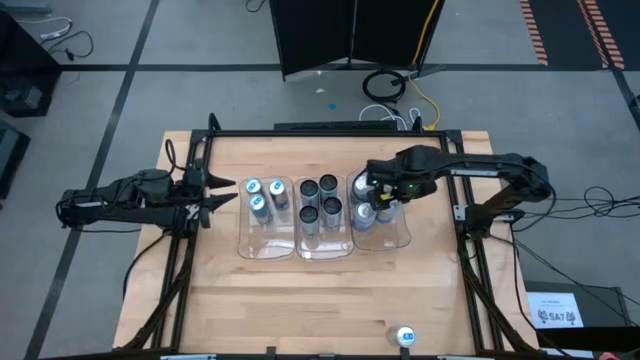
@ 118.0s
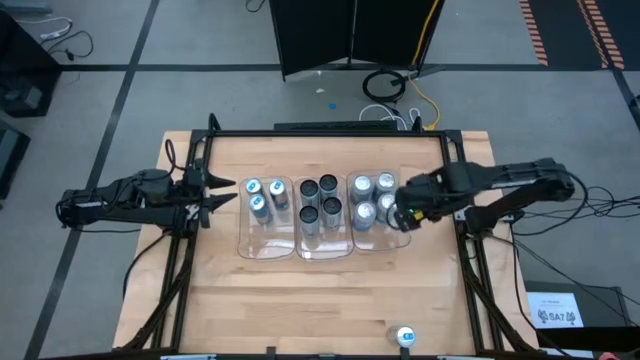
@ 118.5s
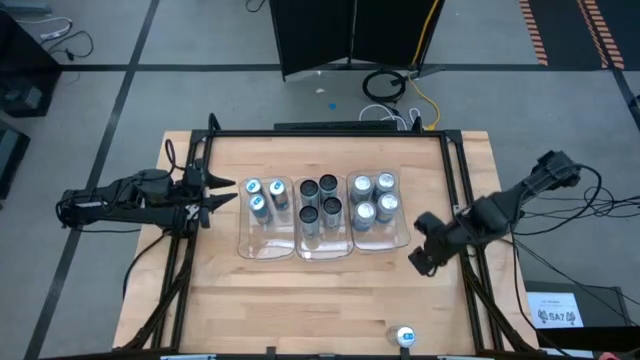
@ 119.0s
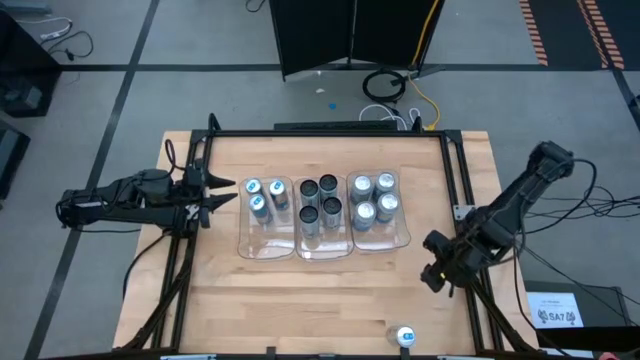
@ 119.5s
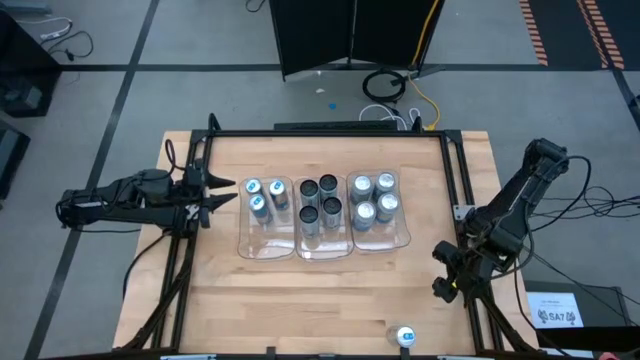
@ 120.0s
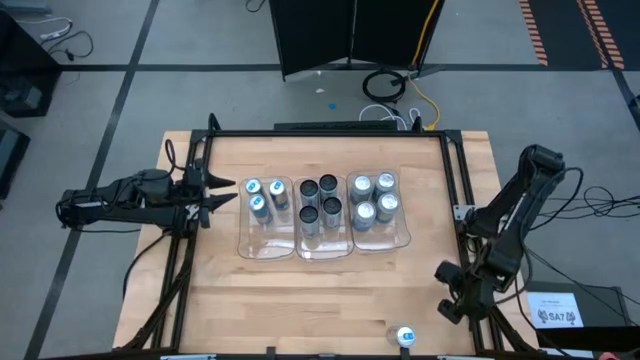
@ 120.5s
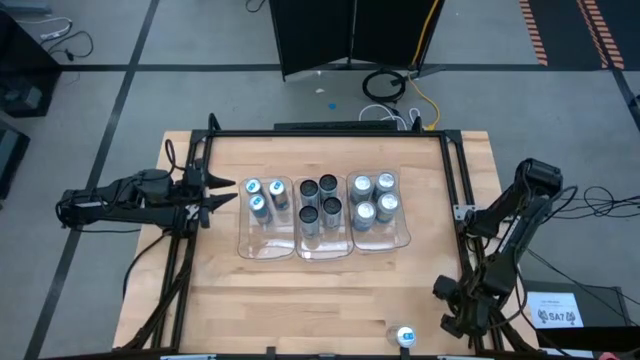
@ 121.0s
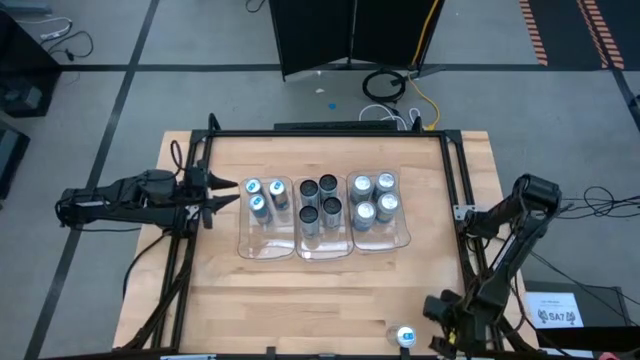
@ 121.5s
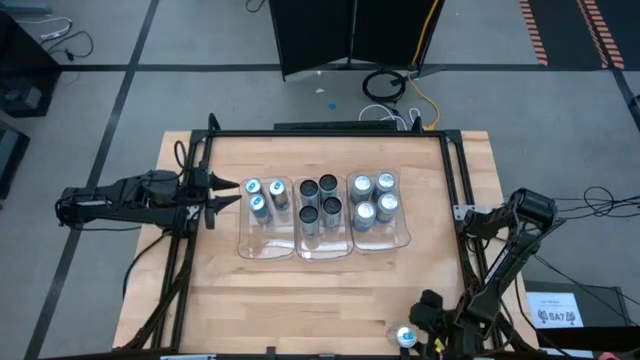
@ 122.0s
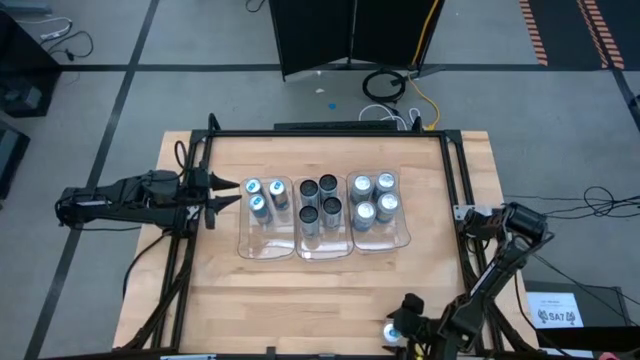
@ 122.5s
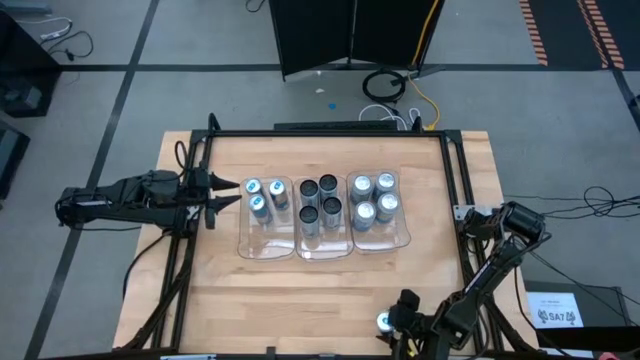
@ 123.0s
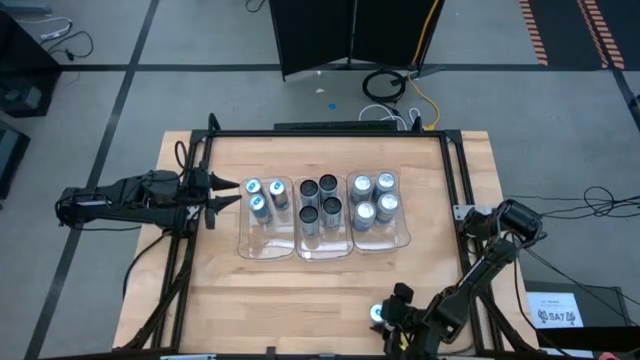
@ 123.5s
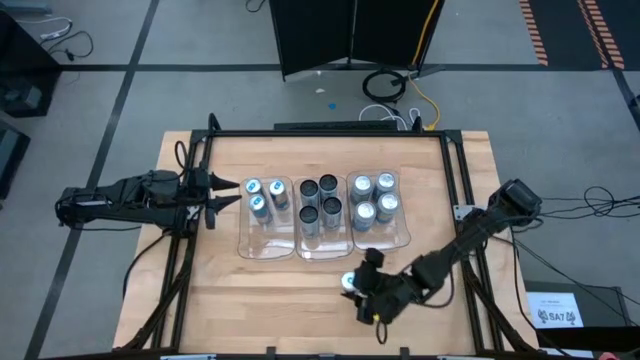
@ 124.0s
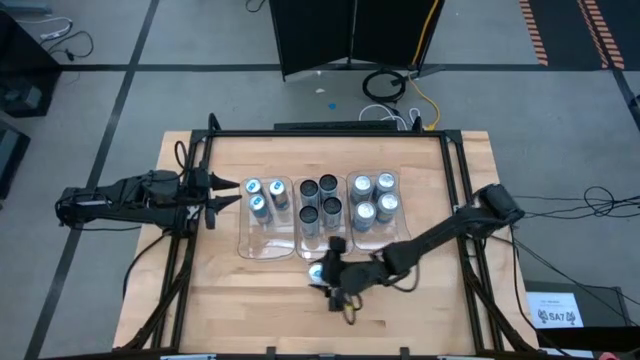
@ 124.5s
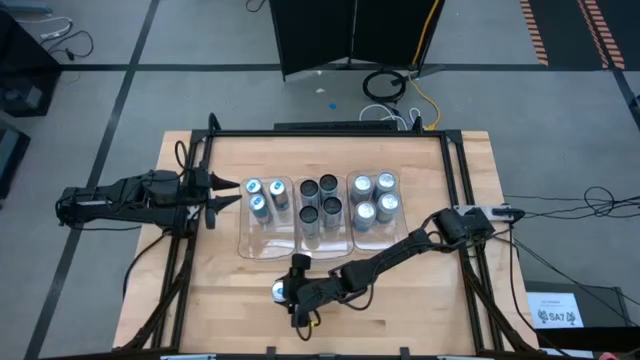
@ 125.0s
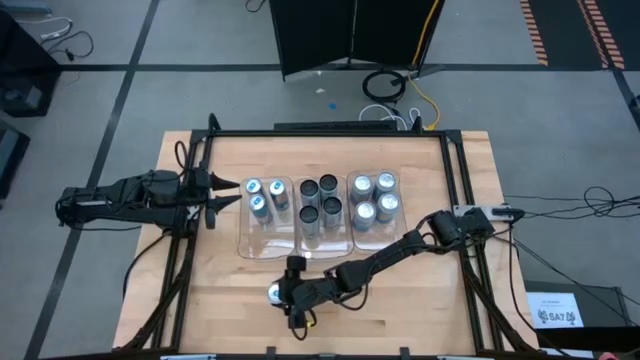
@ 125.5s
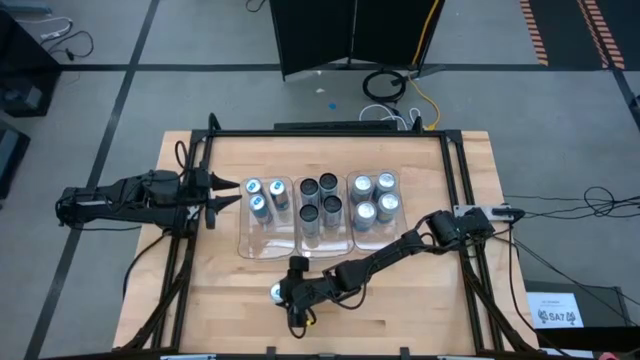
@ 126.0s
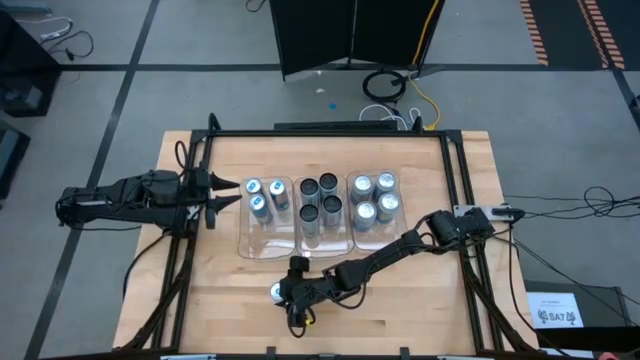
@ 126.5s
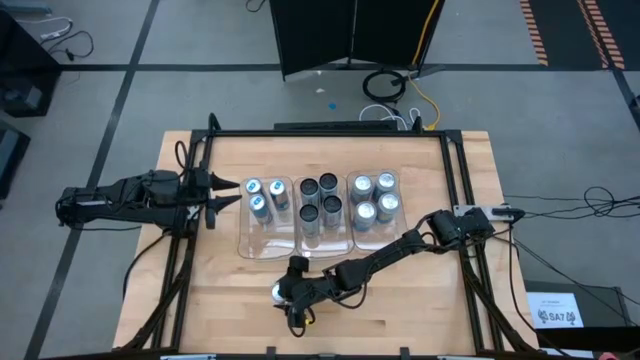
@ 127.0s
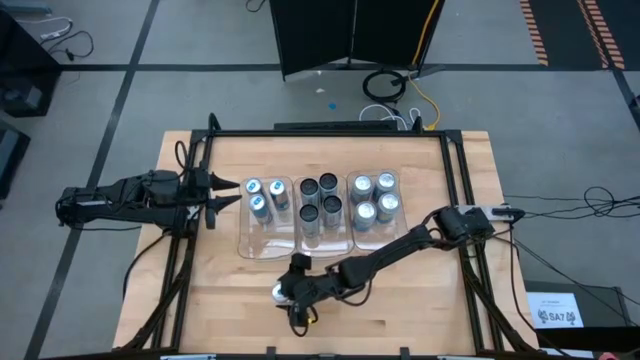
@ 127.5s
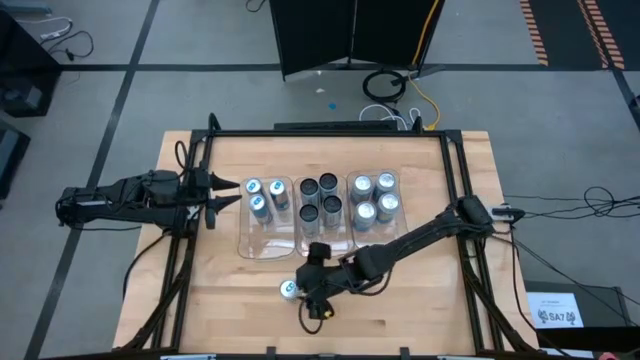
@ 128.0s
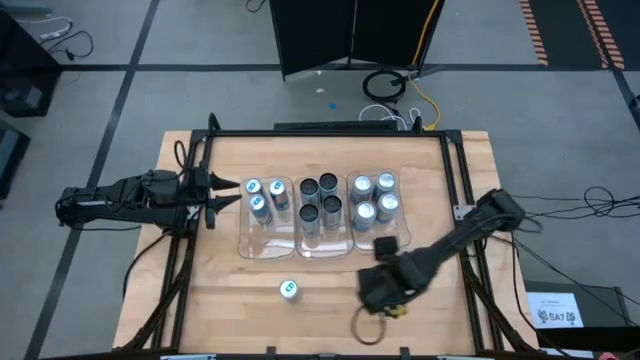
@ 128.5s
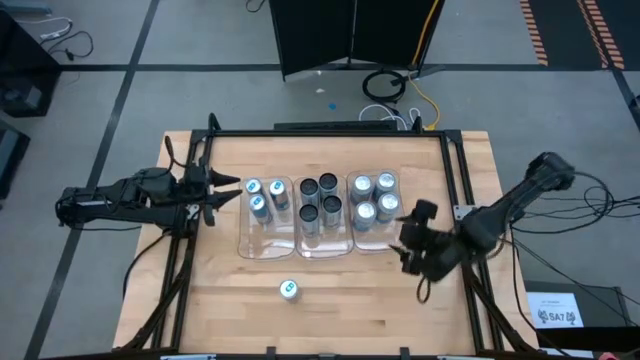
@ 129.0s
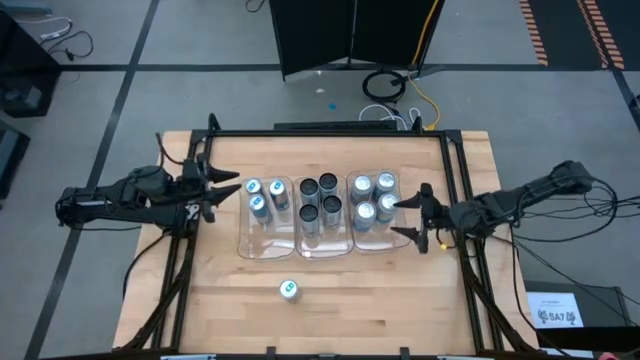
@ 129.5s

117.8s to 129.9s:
Task: Sort soda cans
Put the blue soda can into the left transparent bin

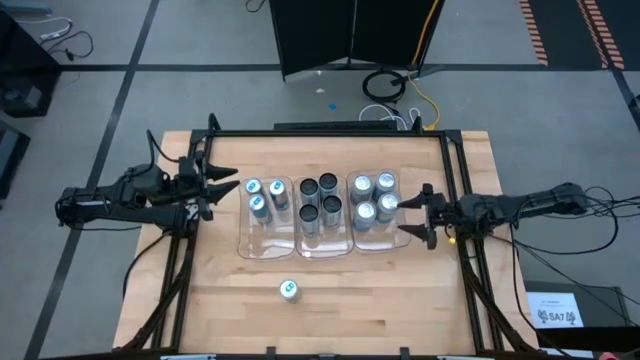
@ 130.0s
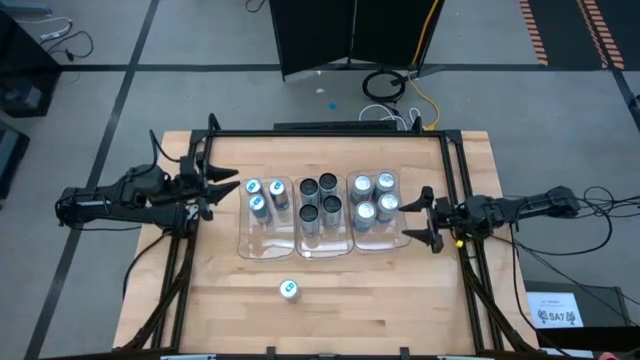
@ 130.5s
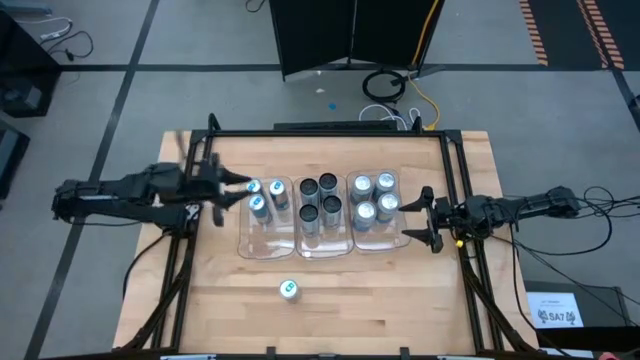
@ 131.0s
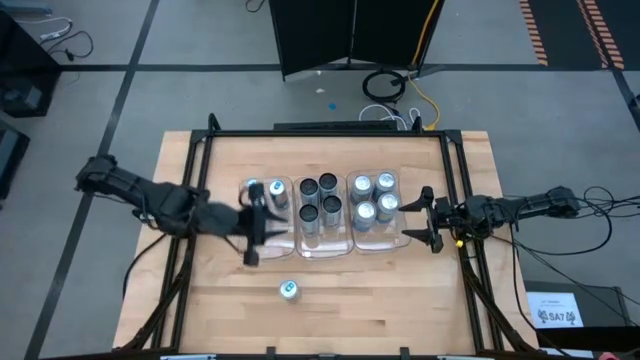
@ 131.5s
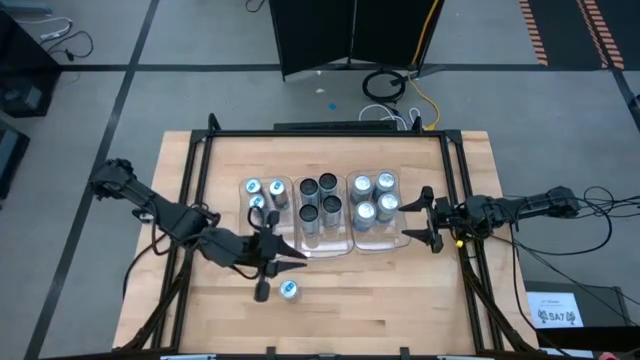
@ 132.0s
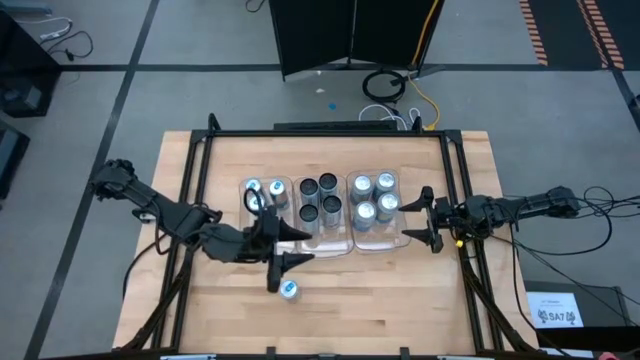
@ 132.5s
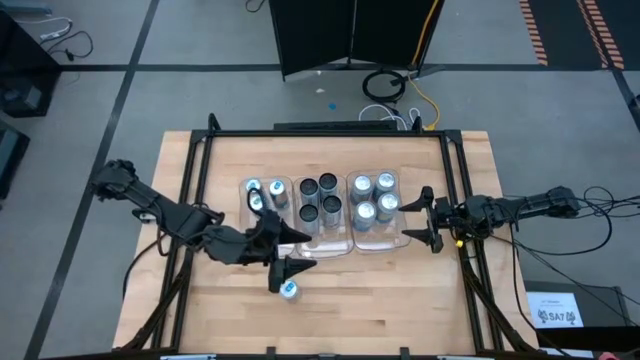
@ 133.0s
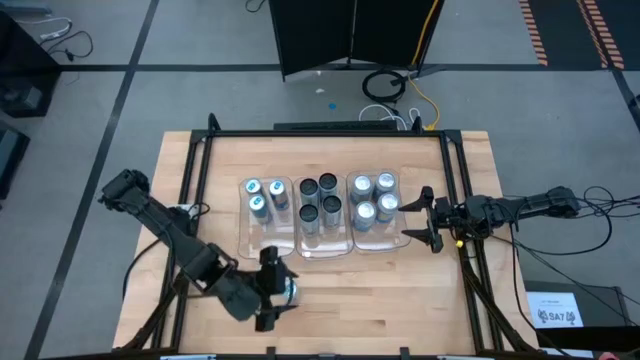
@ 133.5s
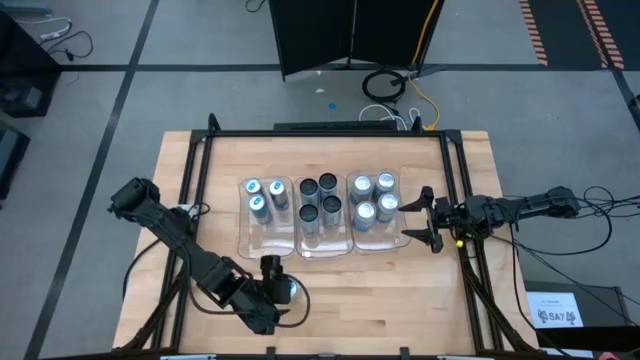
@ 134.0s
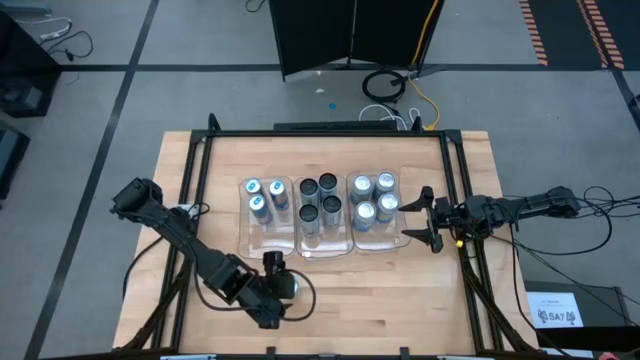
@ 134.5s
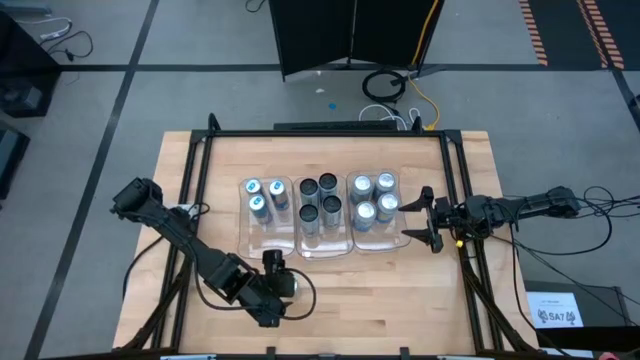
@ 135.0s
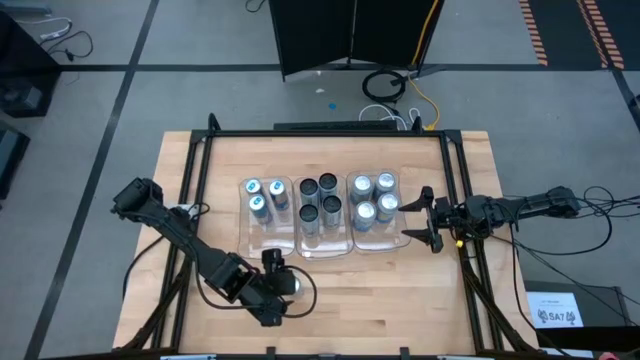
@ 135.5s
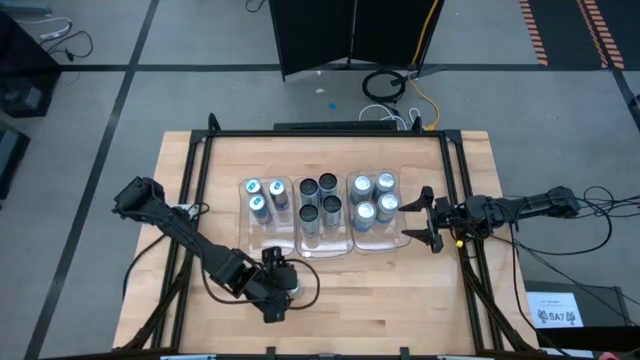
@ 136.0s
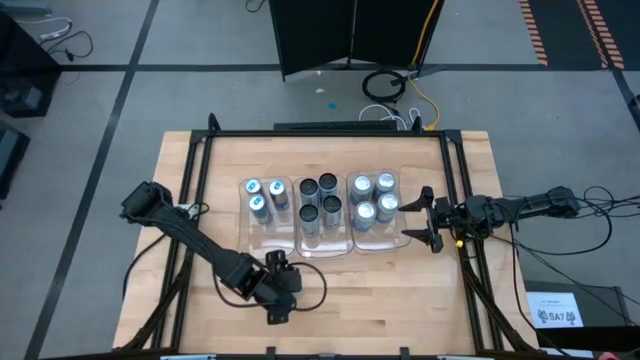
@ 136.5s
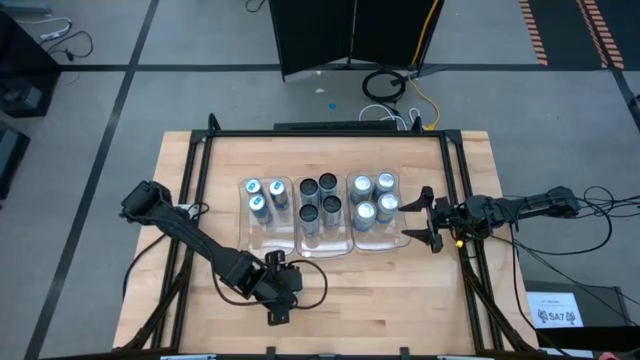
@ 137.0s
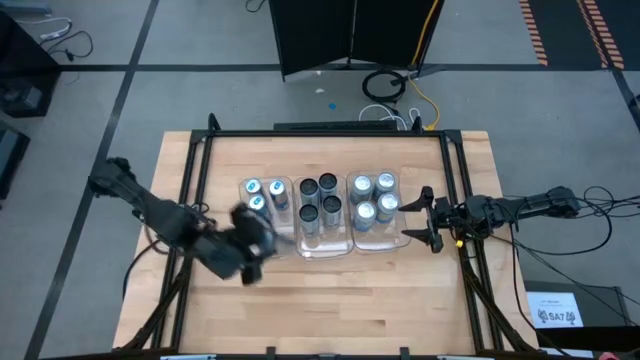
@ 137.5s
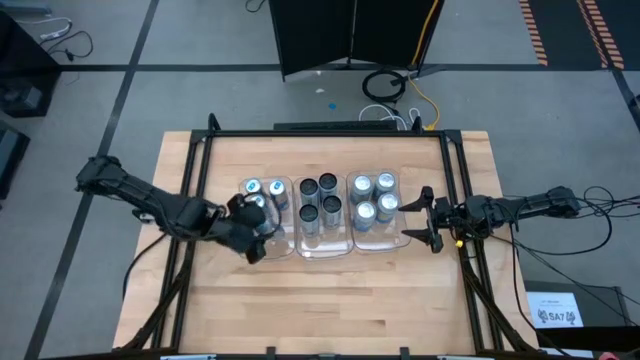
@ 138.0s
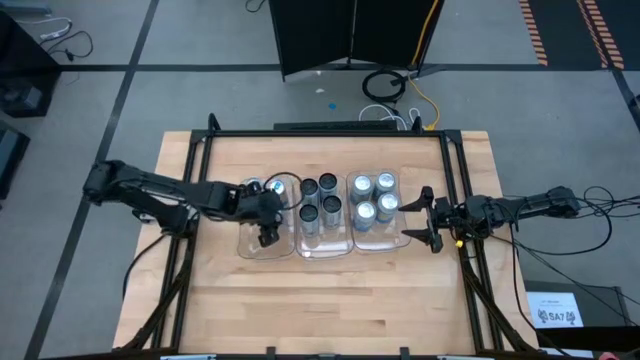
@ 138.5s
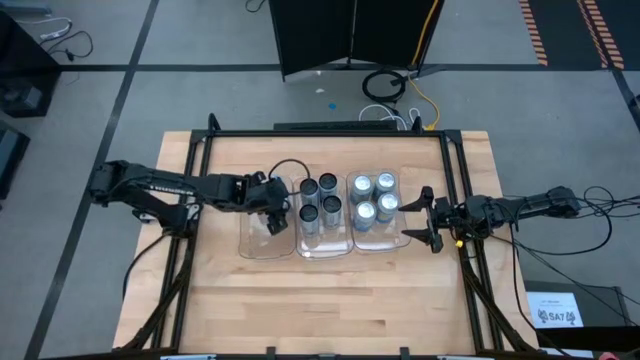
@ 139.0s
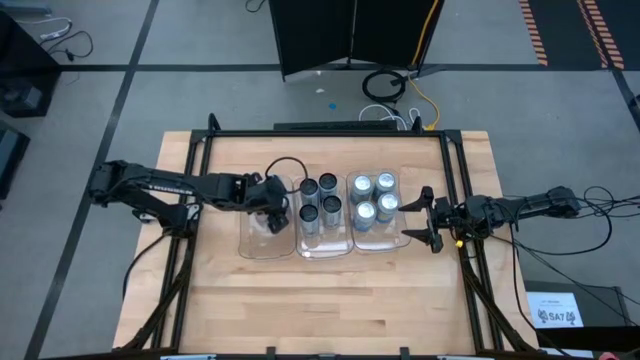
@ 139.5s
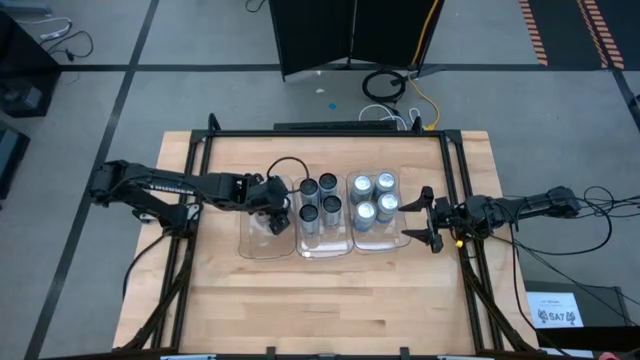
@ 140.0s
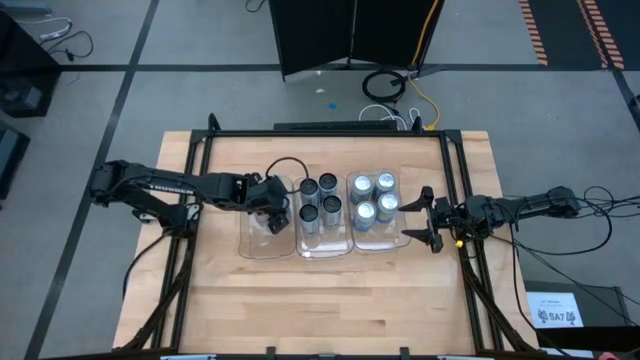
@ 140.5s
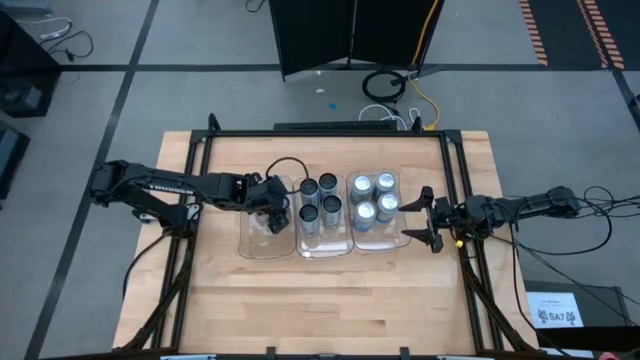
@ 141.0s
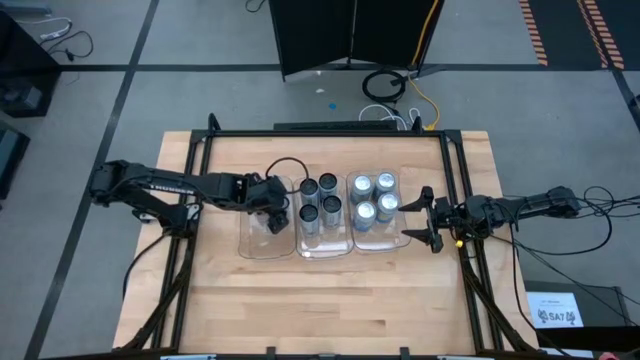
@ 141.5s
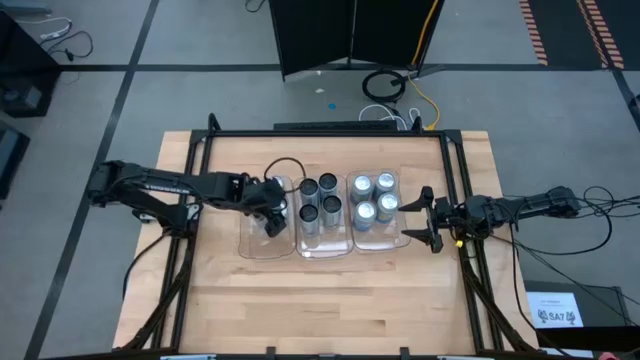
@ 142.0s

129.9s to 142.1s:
Put the blue soda can into the left transparent bin
